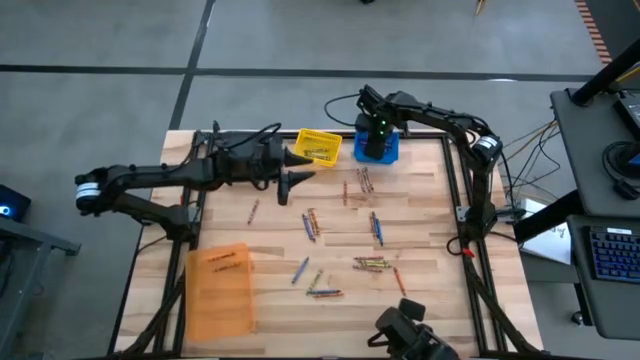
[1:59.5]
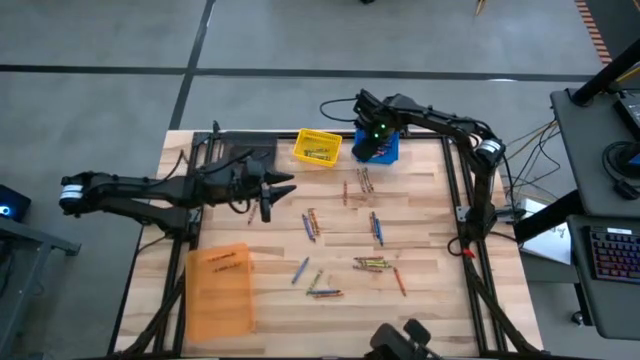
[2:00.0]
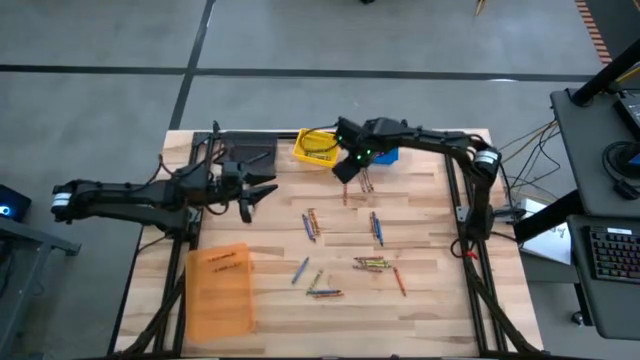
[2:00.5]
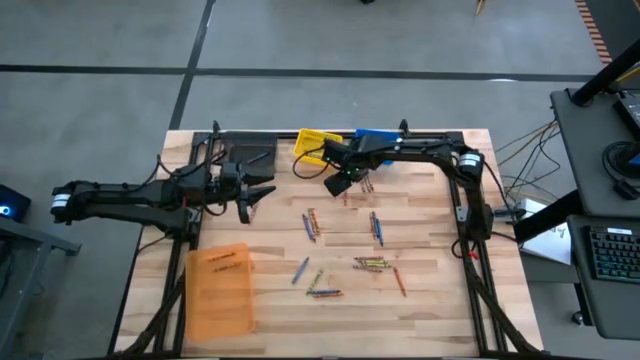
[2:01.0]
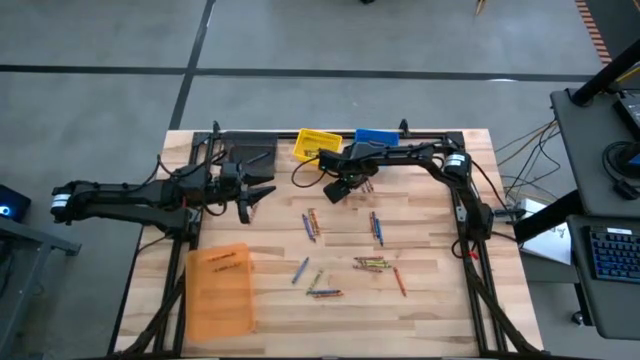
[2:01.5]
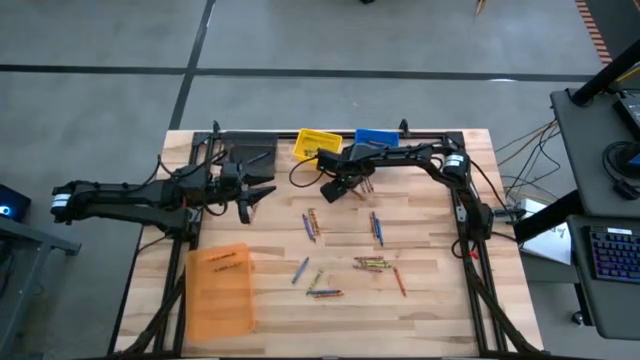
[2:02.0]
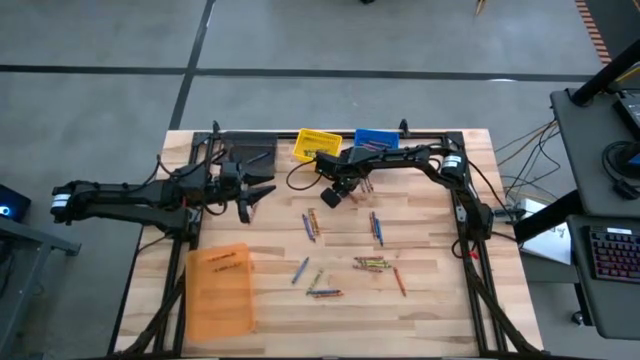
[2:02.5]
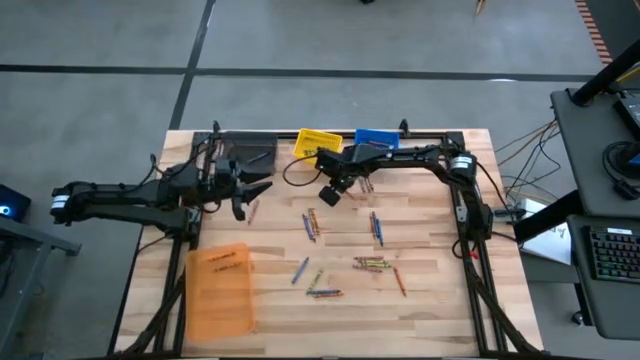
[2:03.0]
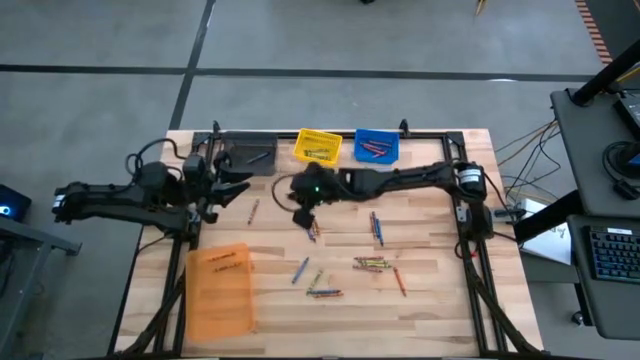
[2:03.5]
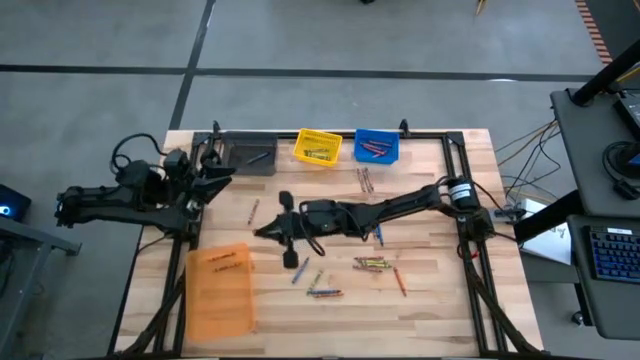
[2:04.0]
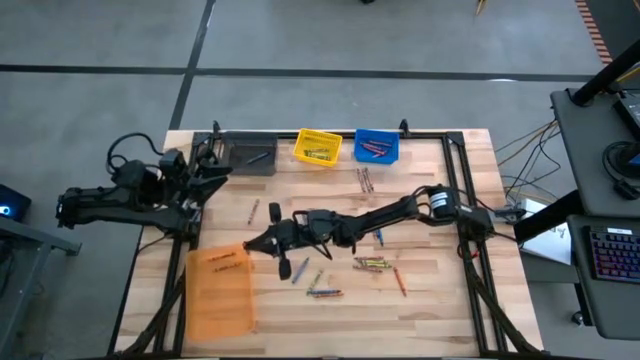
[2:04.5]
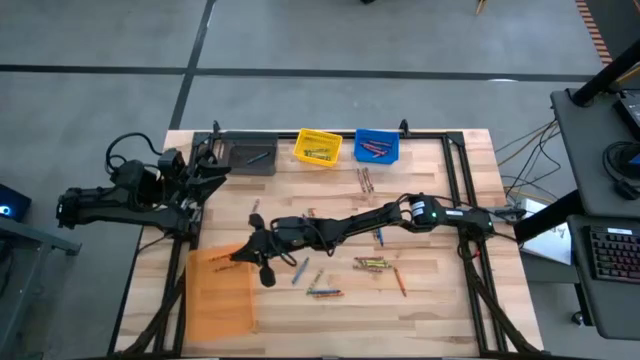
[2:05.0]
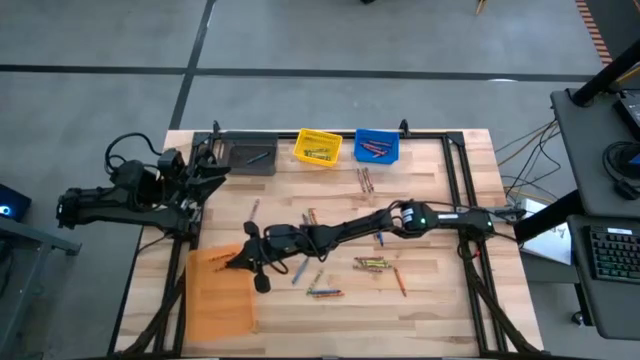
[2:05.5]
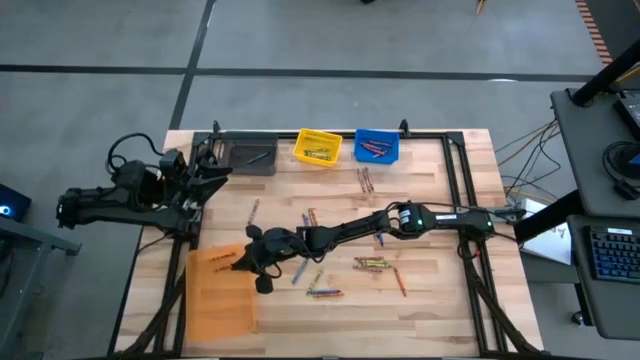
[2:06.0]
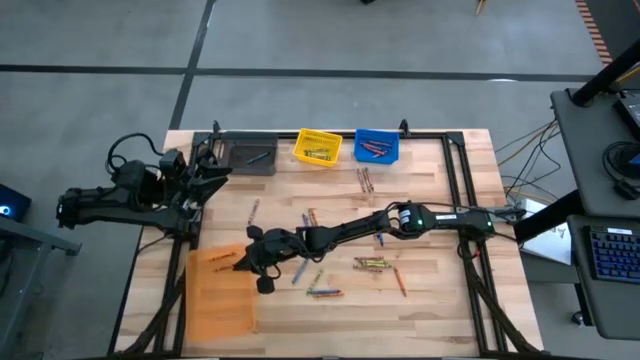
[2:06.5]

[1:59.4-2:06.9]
Task: Sort crayons
Put the orange crayon into the orange bin

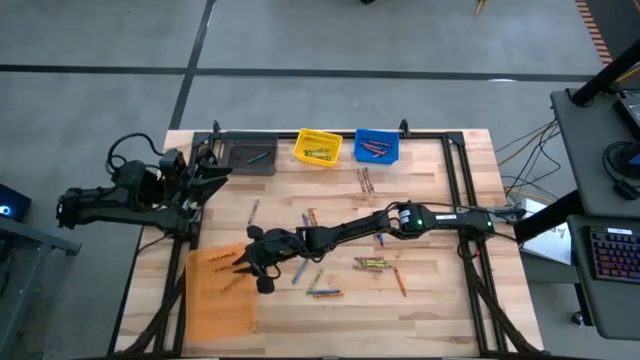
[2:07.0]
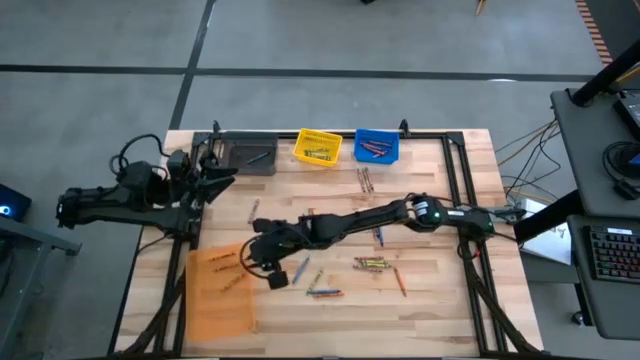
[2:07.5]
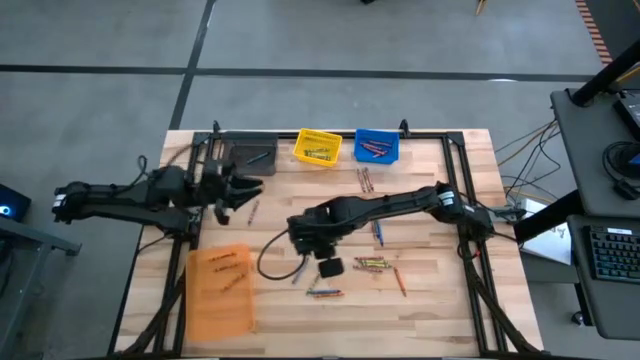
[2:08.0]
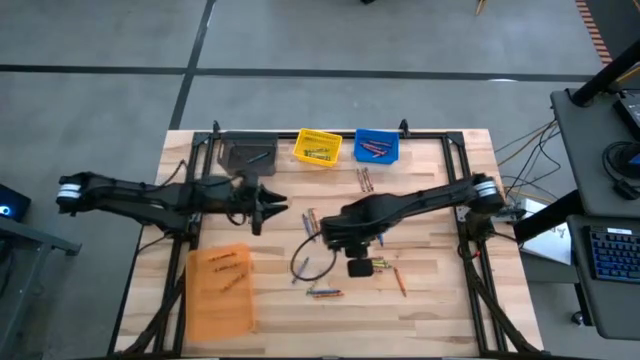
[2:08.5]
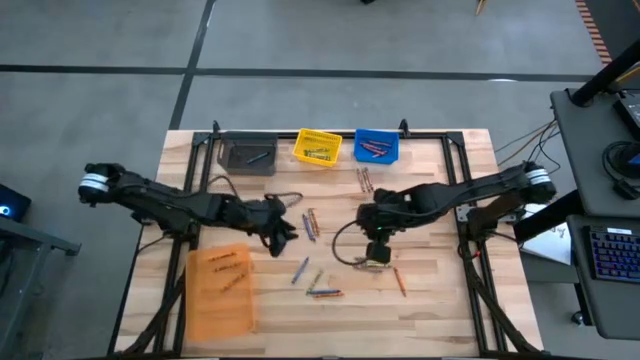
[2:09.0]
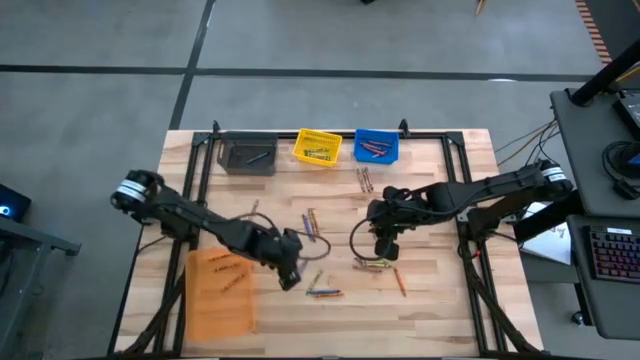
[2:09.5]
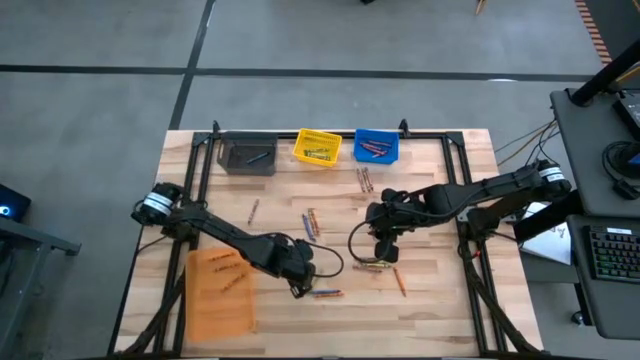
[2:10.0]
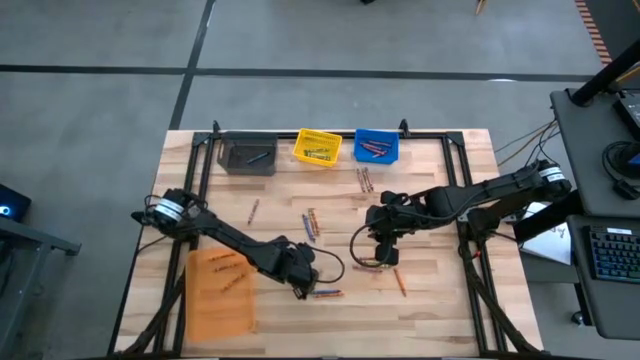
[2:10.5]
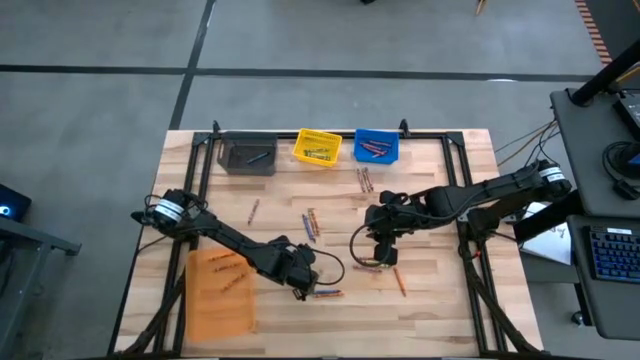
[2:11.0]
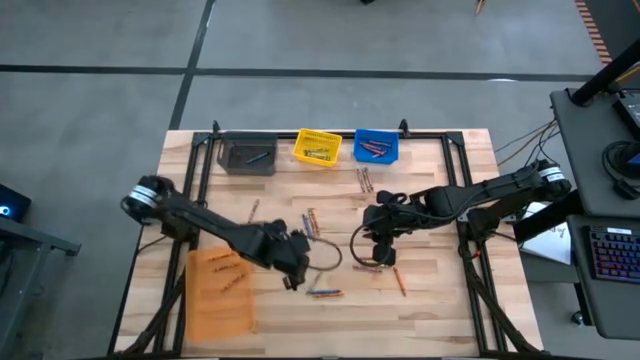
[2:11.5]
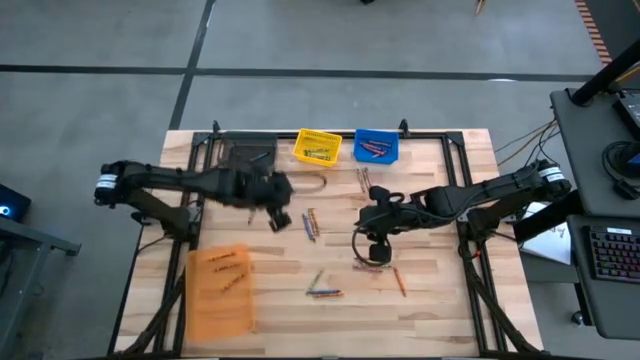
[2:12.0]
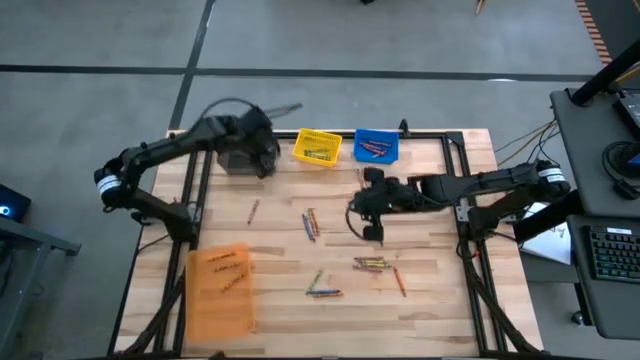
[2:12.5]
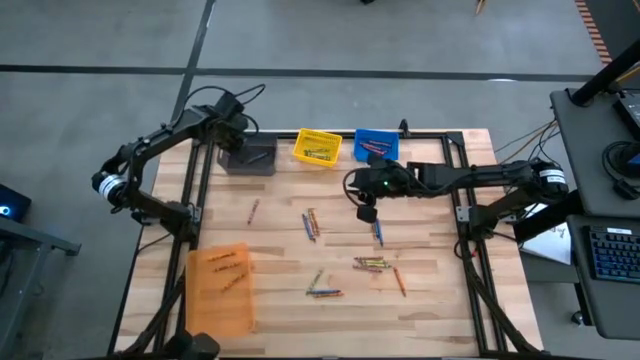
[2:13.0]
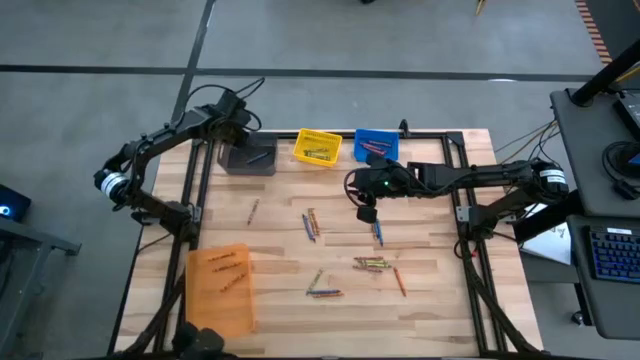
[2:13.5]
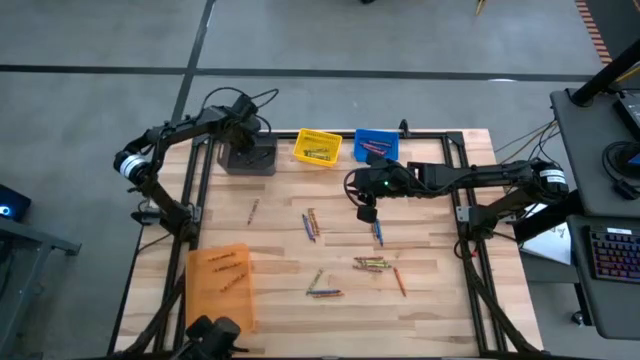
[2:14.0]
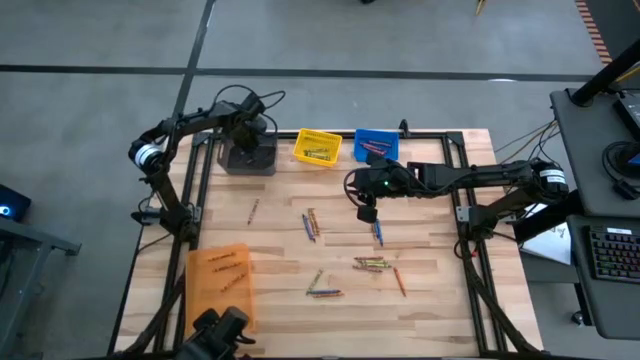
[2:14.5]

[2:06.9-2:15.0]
Put the blue crayon into the black bin

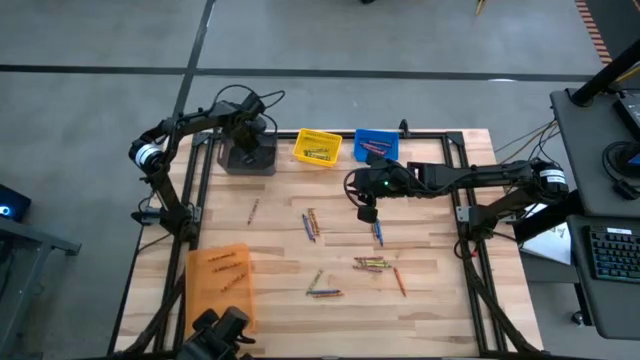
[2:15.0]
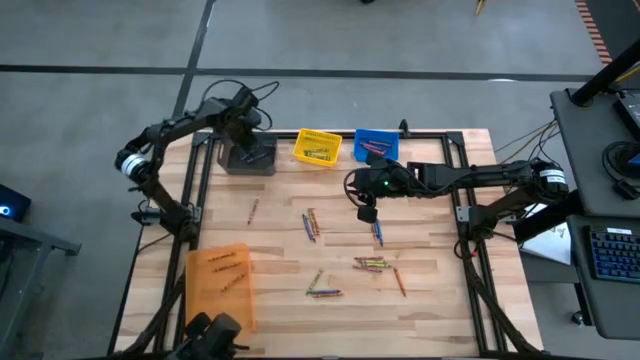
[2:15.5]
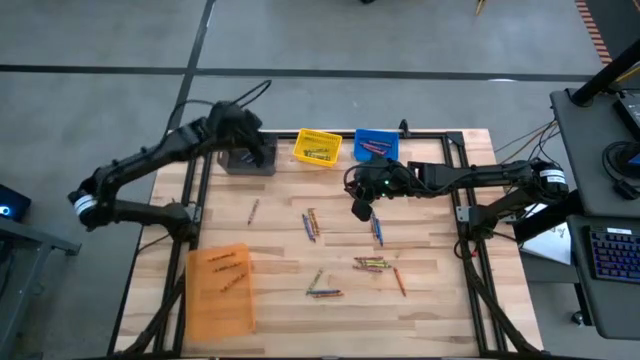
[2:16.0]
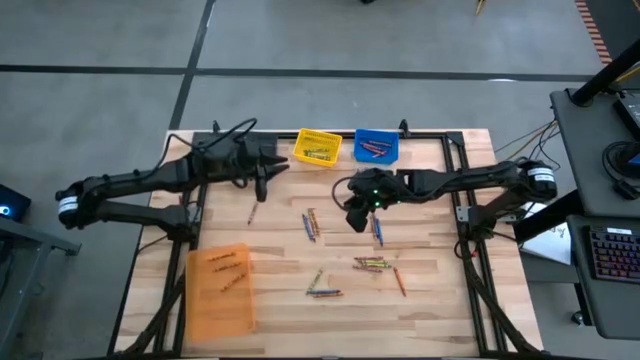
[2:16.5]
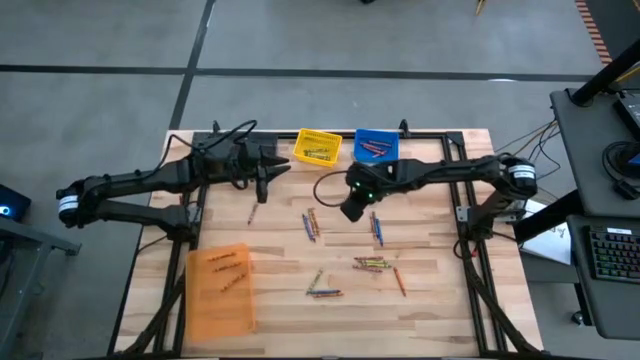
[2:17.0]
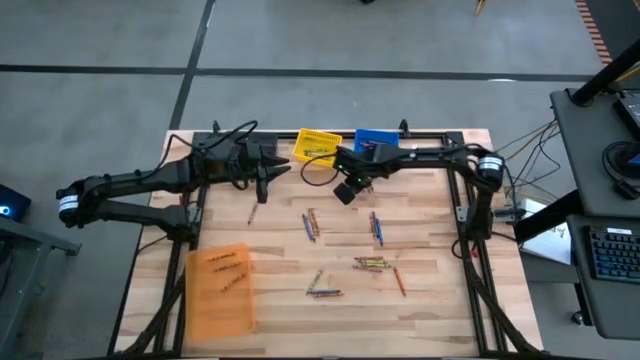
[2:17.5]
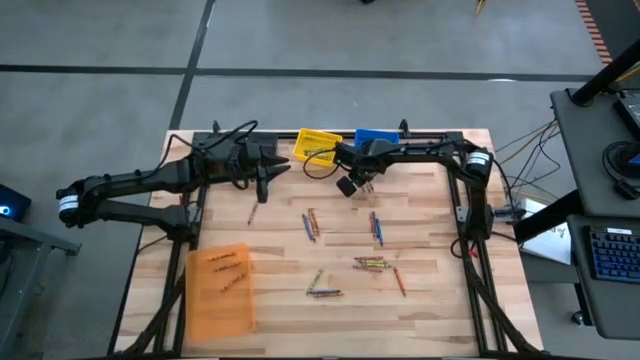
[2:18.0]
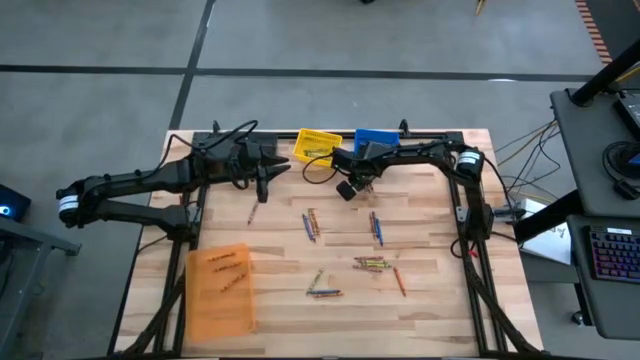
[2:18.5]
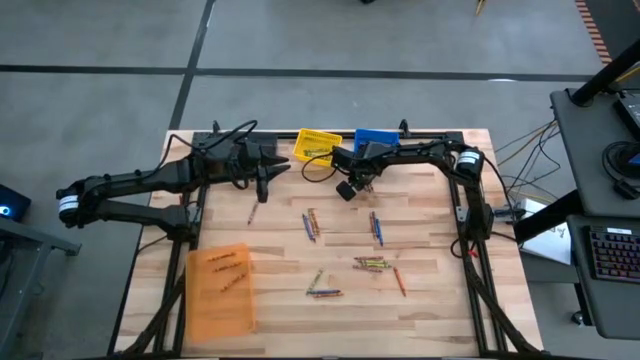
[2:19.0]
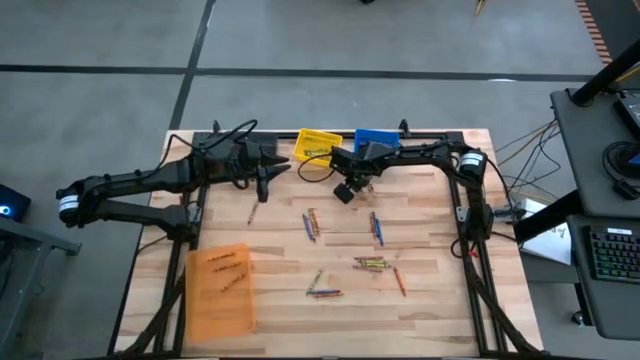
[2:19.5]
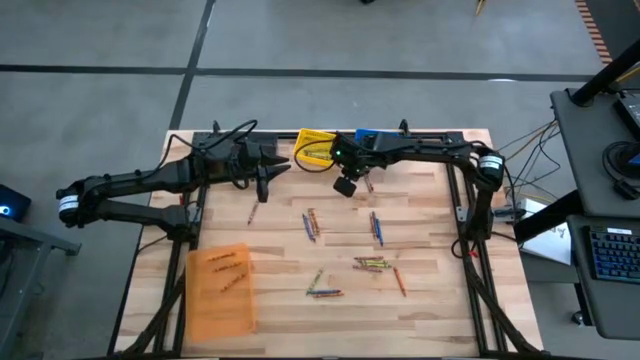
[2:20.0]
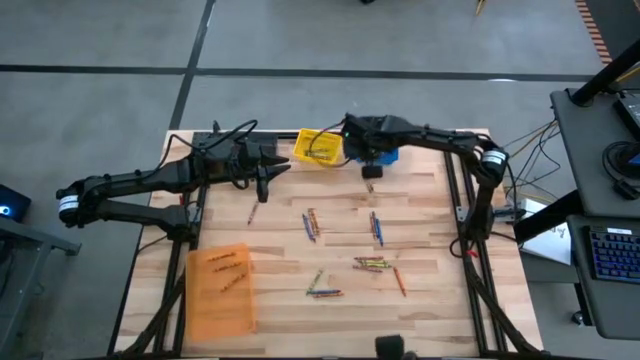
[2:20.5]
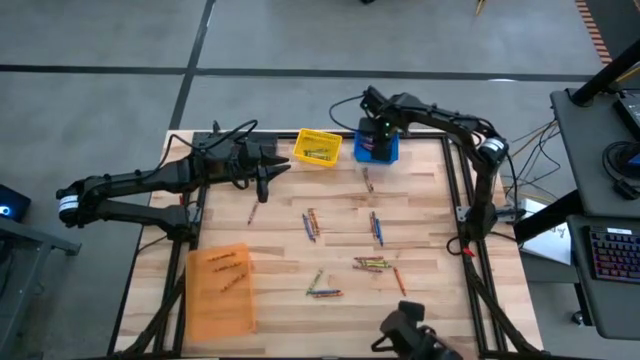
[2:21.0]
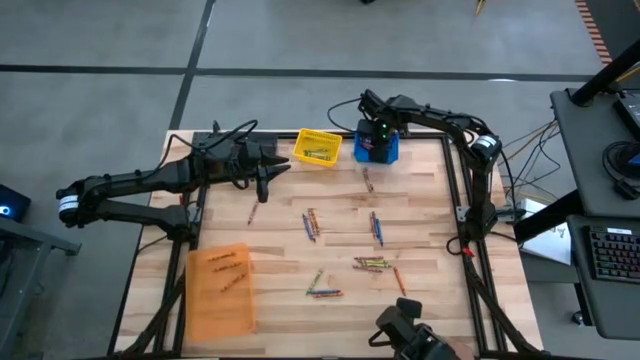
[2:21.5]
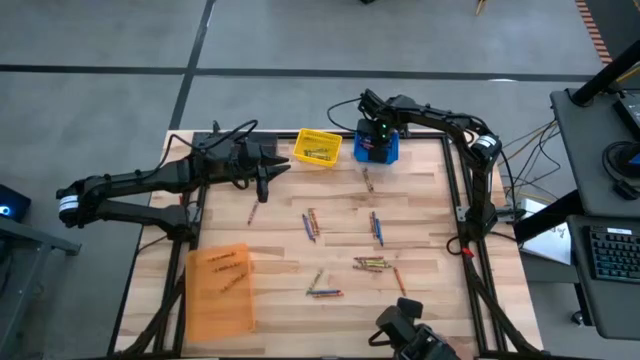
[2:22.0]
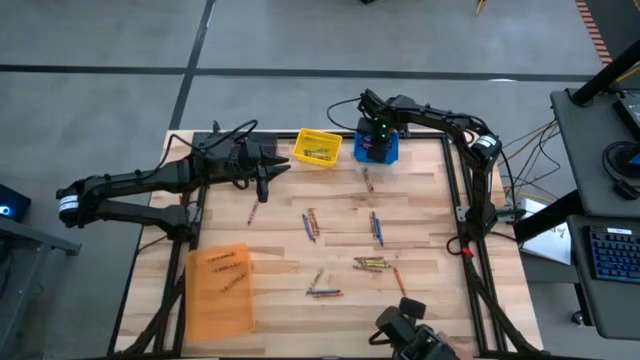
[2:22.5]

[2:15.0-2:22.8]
Put the red crayon into the blue bin
